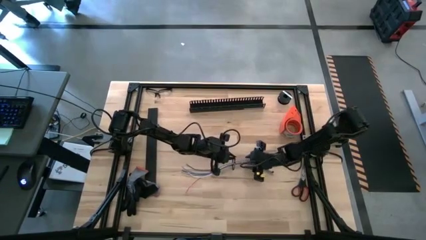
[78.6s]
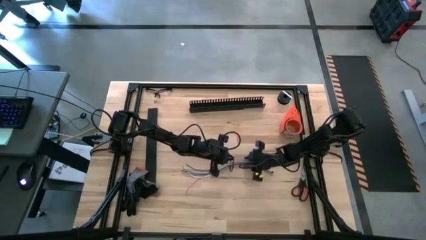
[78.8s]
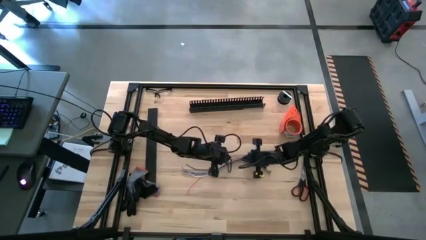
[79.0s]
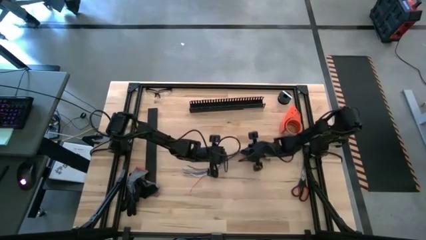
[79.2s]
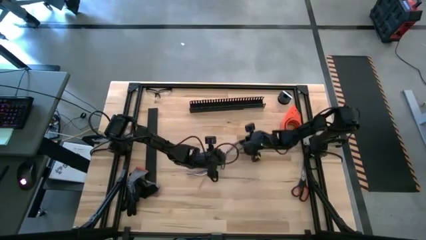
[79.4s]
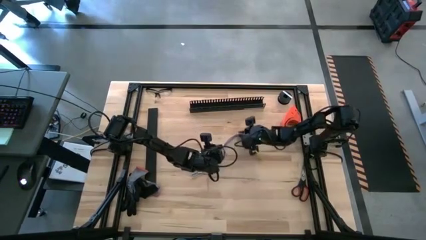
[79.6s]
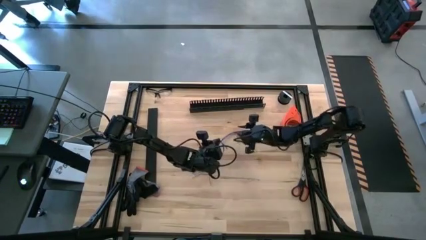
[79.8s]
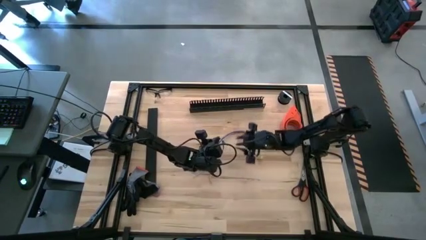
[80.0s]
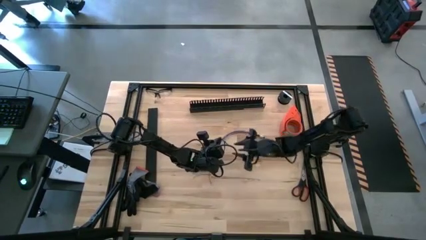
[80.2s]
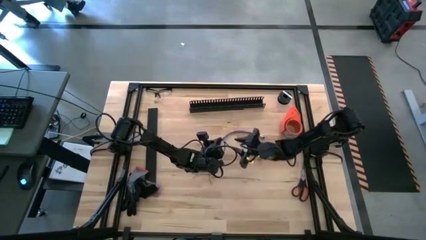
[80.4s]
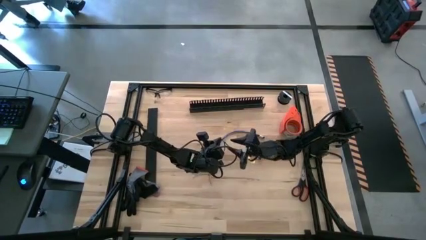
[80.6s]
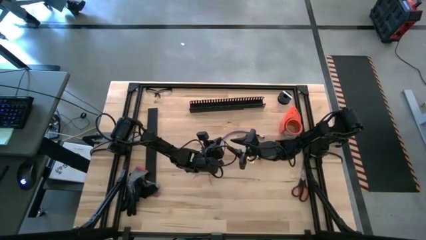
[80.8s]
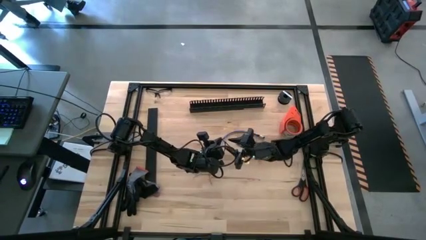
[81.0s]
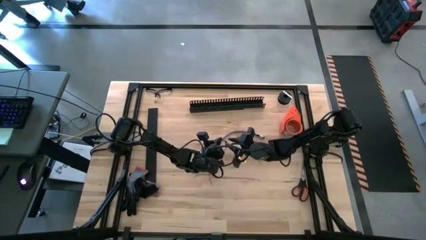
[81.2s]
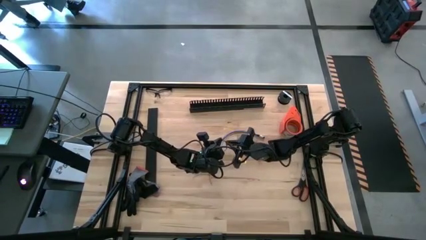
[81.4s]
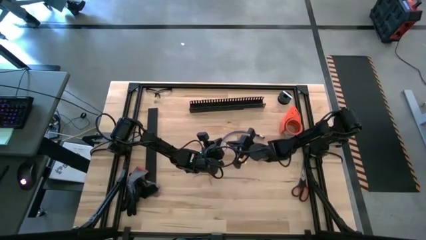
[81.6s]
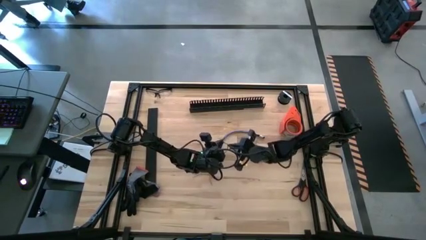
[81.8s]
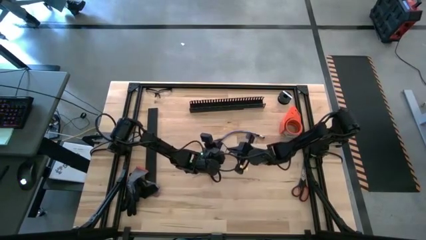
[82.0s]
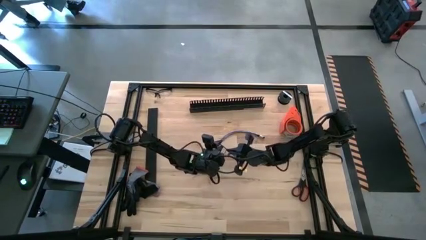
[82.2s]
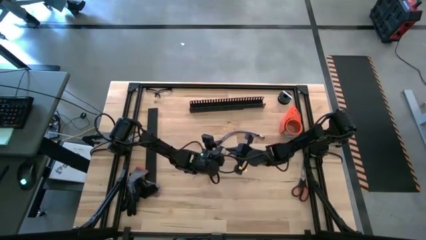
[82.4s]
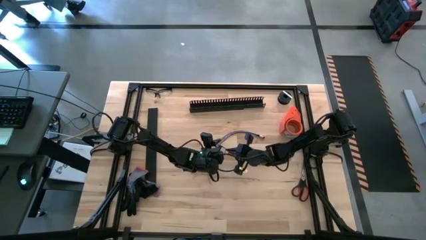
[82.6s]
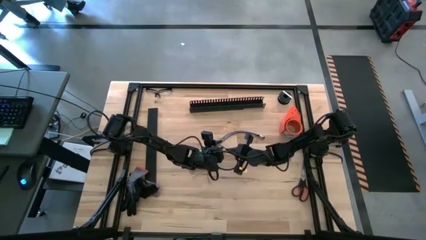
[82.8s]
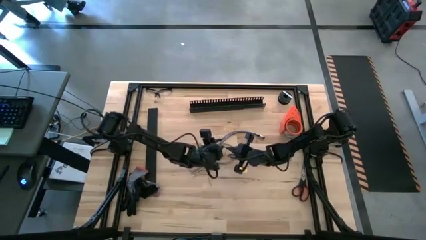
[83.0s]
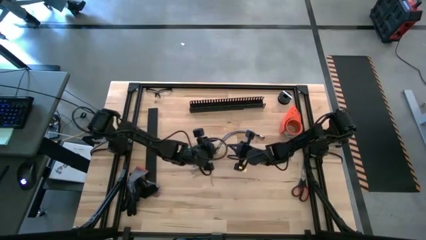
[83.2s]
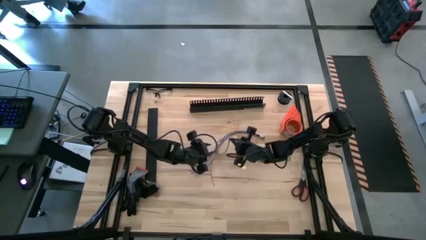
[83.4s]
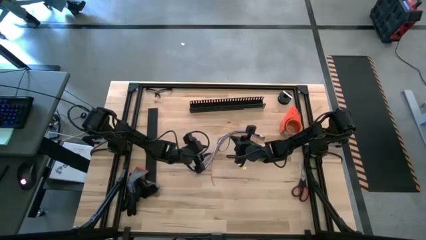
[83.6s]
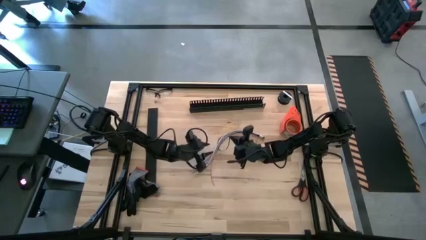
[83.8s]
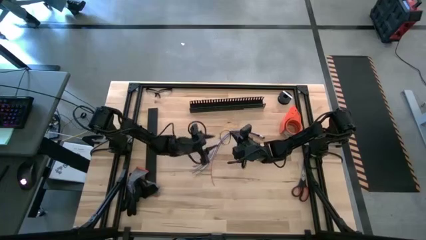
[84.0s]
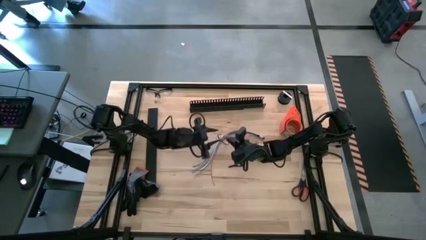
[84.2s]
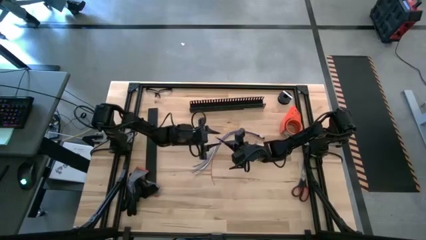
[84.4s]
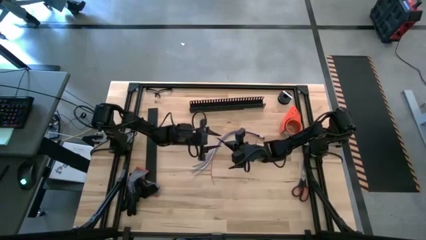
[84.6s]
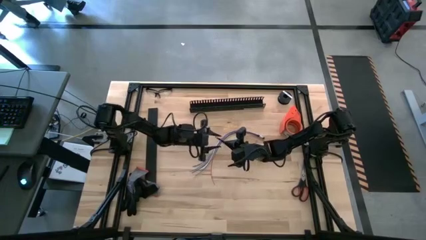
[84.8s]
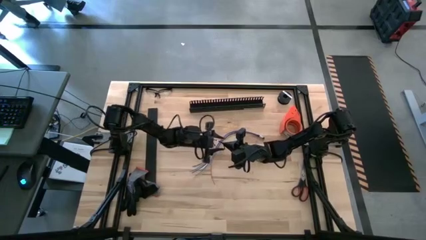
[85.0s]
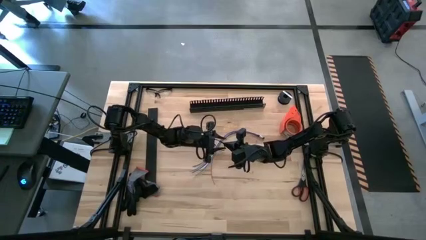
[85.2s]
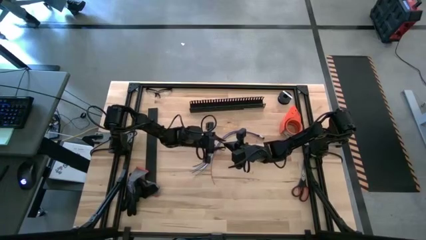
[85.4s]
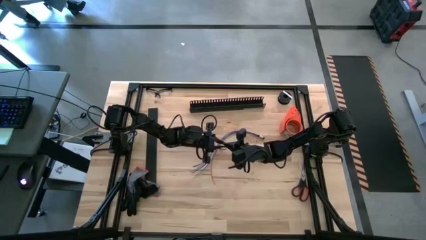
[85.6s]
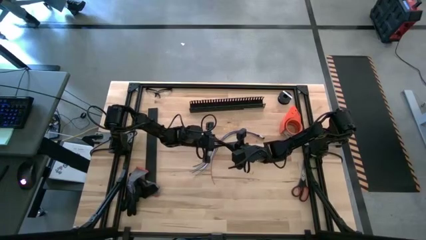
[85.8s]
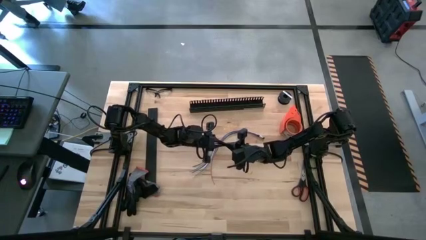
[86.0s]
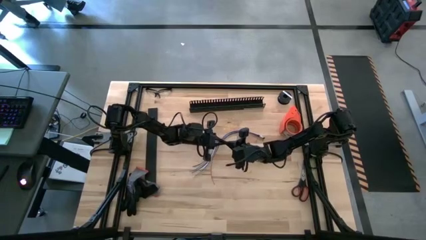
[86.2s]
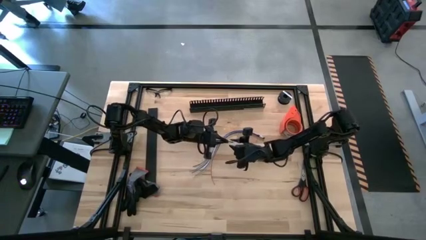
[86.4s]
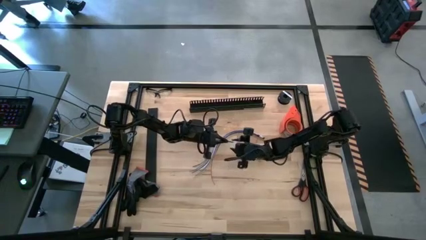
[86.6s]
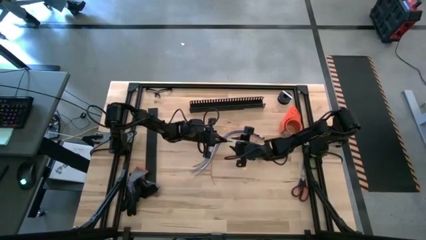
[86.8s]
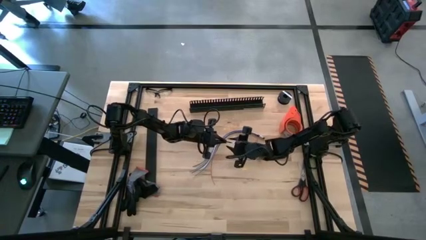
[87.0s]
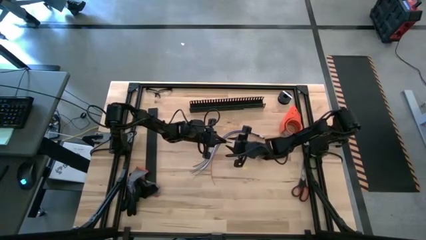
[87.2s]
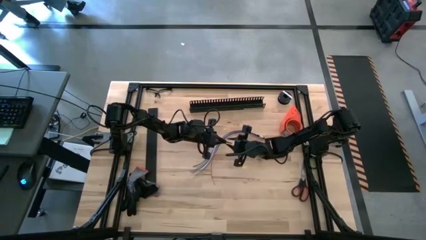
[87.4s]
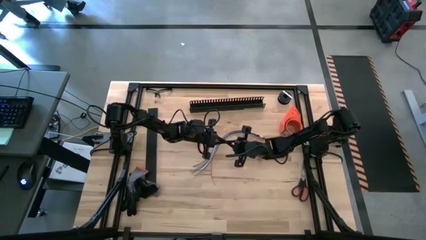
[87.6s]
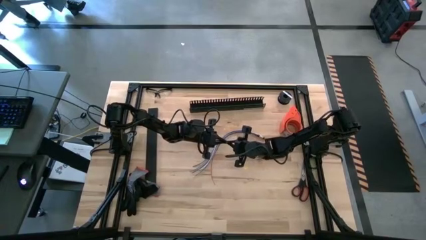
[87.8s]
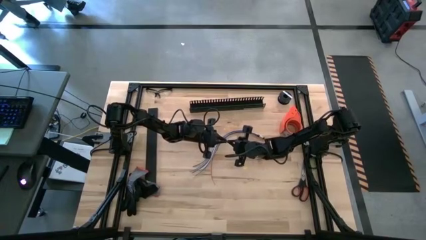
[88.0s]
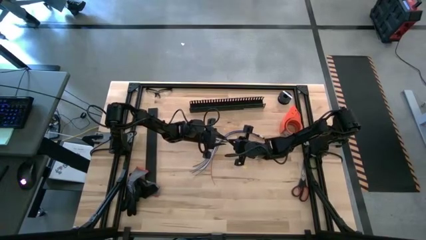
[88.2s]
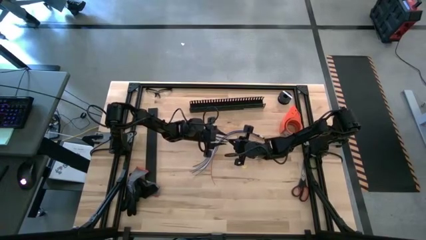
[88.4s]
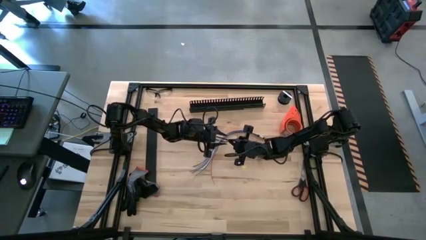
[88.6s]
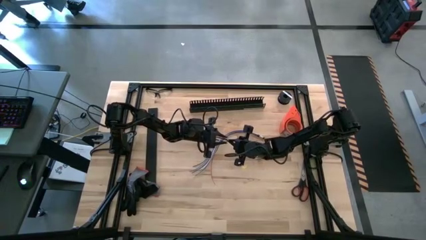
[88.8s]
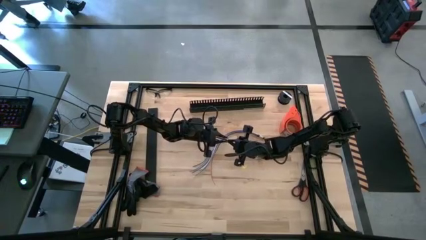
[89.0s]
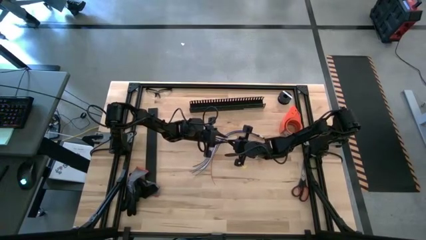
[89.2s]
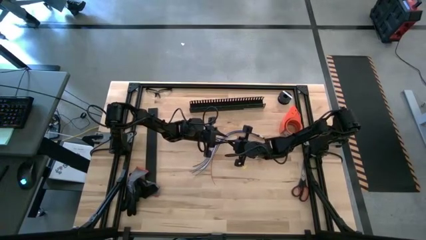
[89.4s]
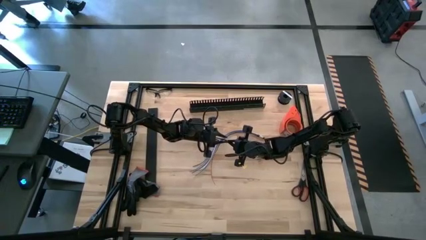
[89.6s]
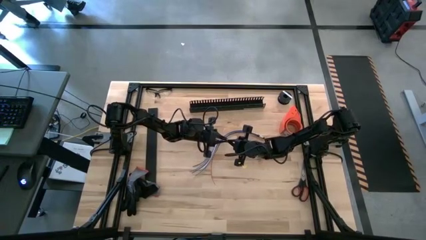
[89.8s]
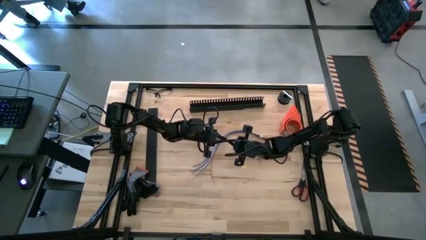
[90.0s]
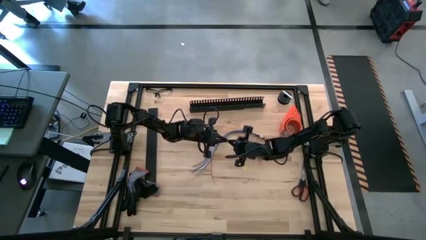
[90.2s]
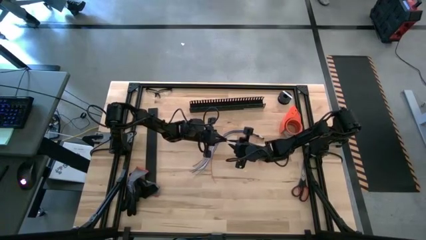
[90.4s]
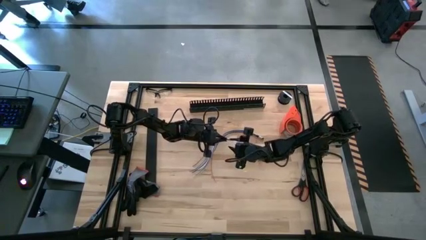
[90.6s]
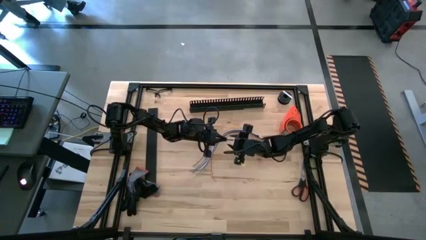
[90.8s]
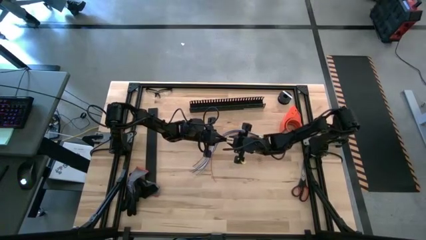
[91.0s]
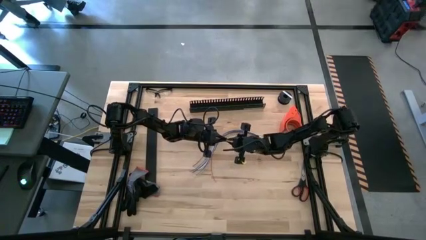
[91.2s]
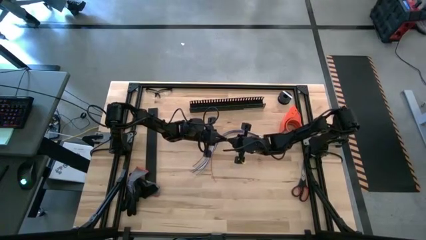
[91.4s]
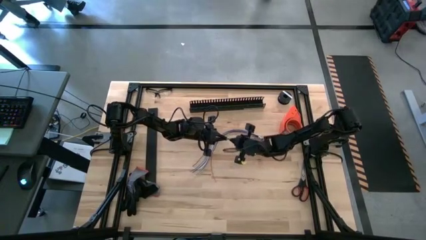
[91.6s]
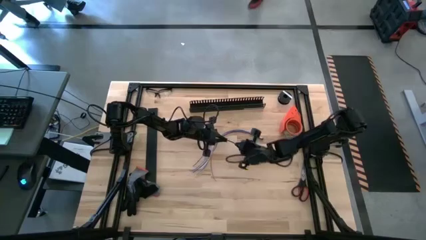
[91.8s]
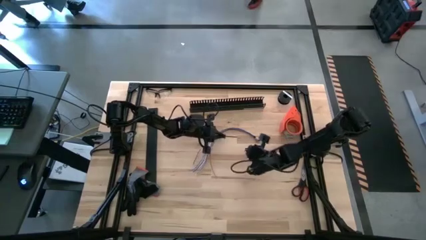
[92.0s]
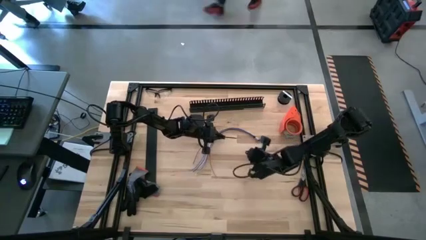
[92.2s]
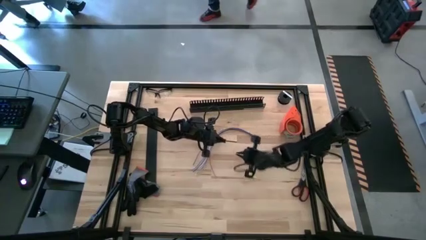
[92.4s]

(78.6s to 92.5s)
Task: Ziptie cables
Wrap the zip tie around the cable wire

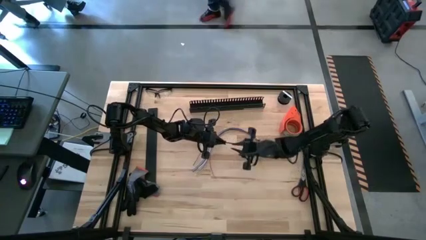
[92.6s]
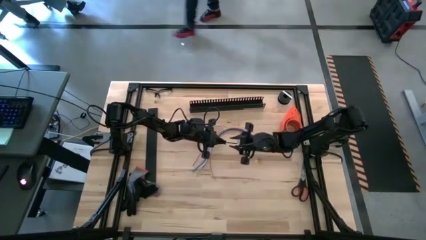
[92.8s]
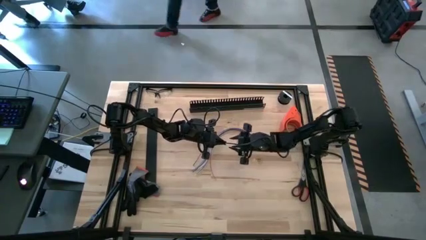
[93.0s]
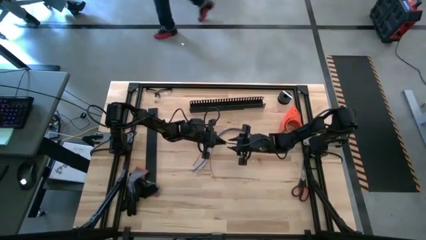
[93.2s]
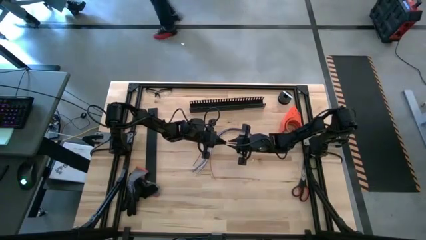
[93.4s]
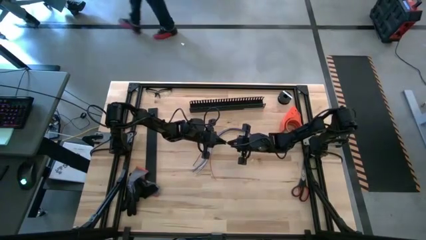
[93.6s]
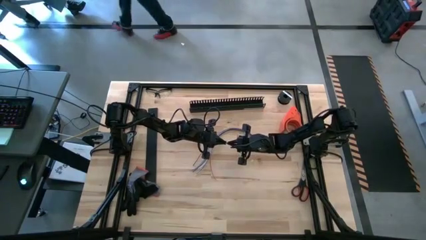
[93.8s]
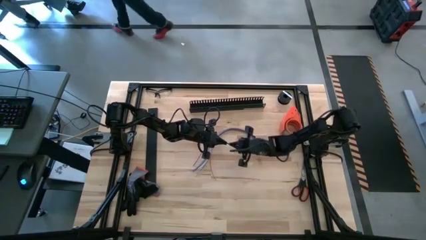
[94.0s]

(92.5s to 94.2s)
Wrap the zip tie around the cable wire

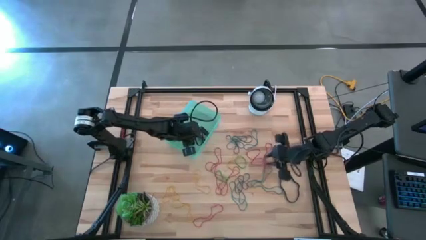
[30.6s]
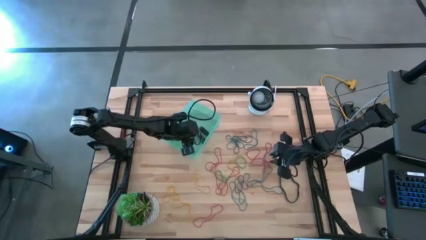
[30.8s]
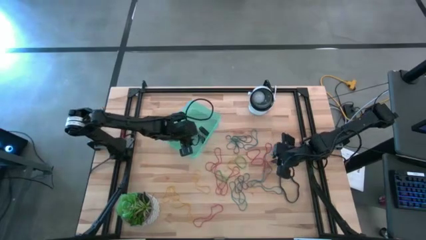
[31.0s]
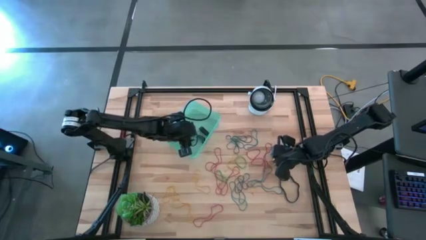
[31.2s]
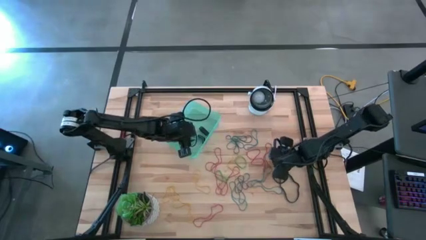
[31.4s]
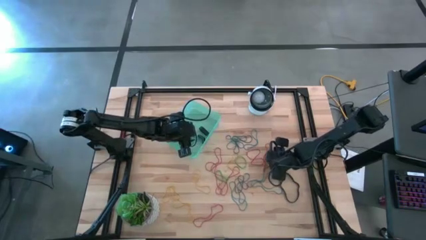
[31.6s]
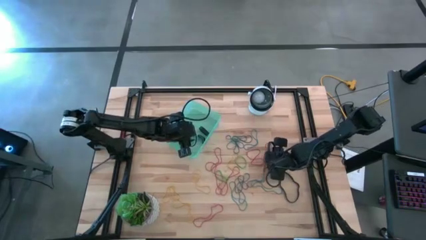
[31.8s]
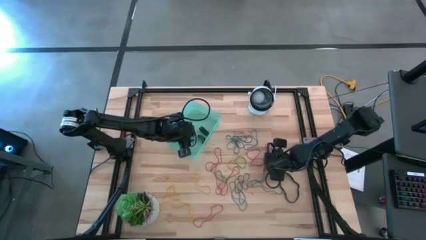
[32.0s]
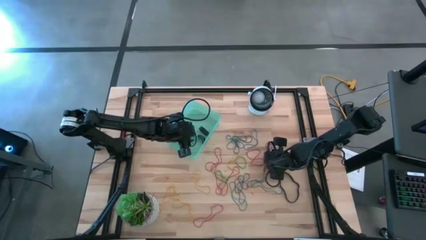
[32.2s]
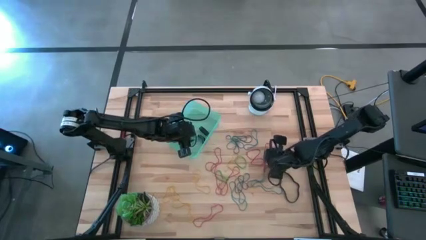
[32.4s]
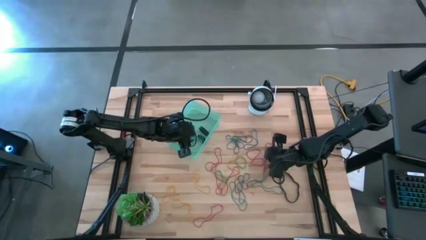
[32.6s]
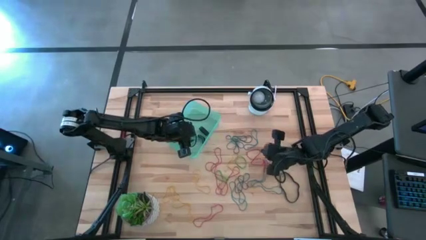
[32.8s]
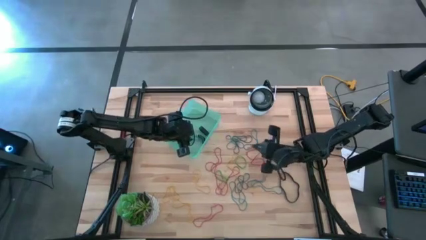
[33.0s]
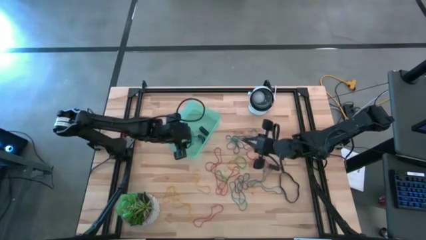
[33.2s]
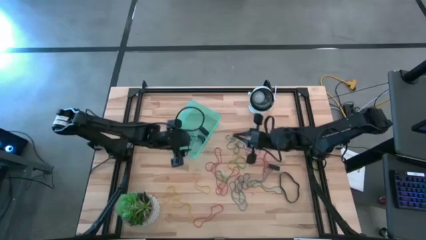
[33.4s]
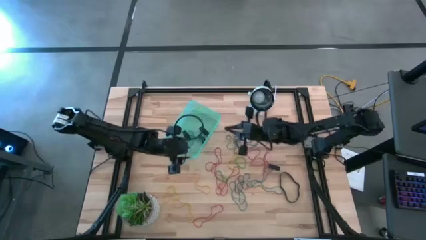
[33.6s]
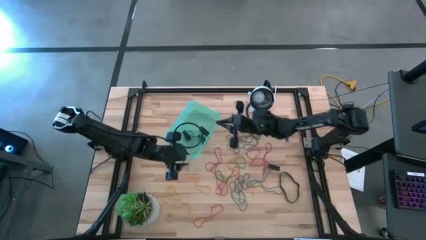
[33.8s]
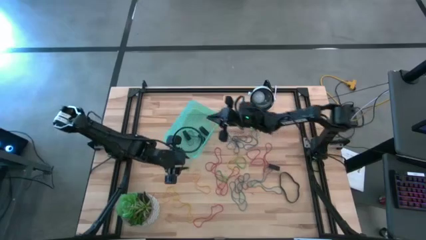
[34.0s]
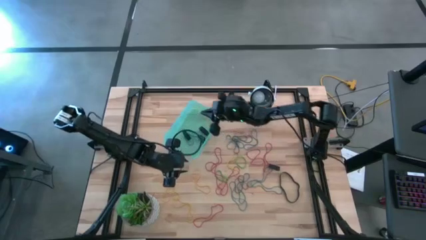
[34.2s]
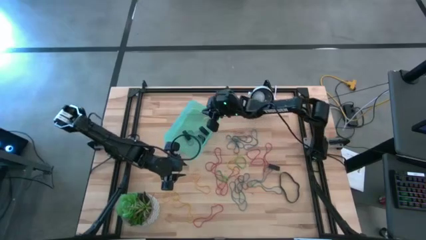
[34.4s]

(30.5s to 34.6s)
Task: Pick and place rubber bands into bin
Put the yellow rubber band into the green bin
